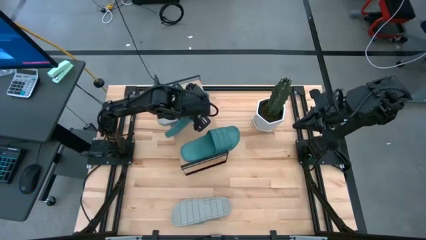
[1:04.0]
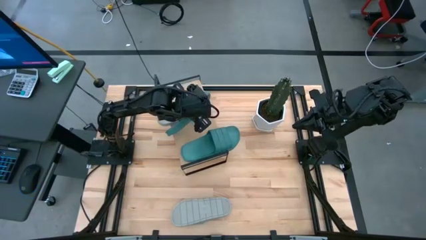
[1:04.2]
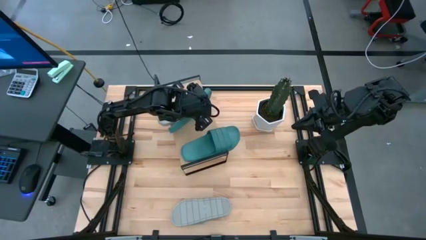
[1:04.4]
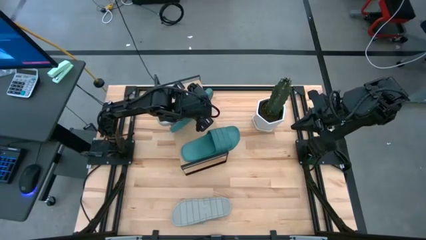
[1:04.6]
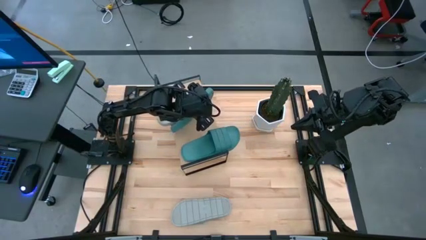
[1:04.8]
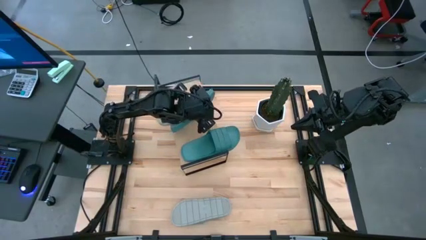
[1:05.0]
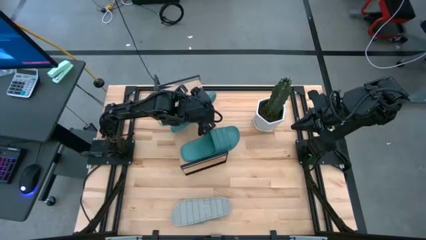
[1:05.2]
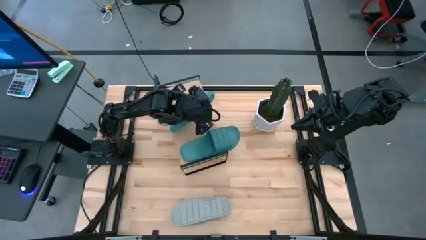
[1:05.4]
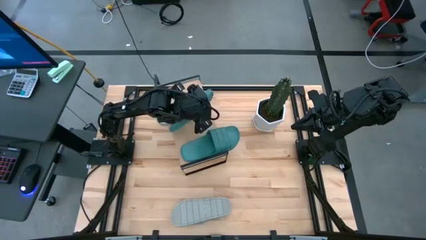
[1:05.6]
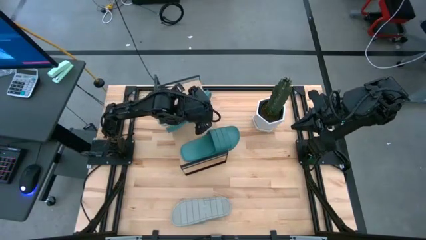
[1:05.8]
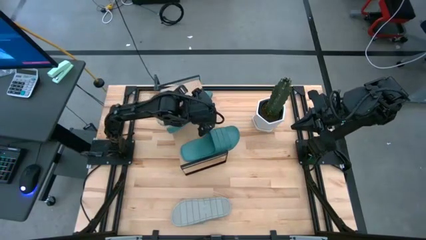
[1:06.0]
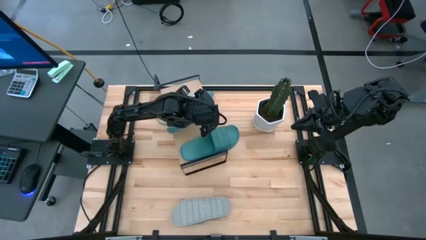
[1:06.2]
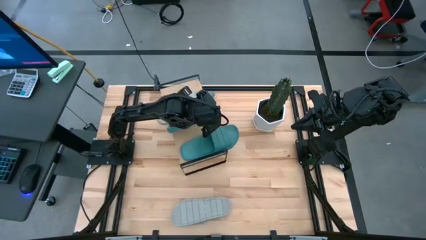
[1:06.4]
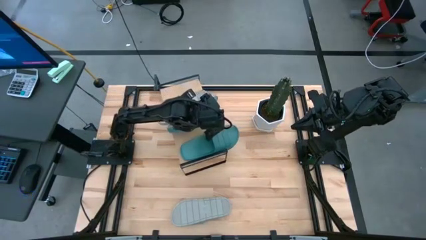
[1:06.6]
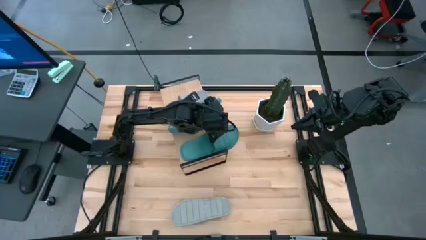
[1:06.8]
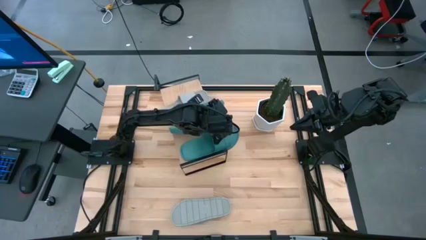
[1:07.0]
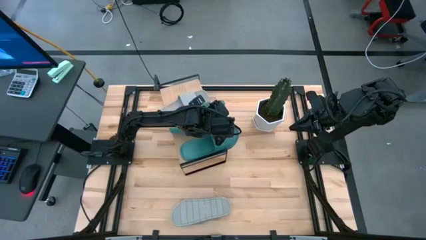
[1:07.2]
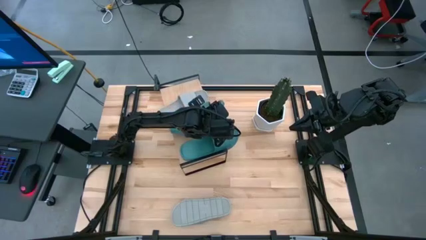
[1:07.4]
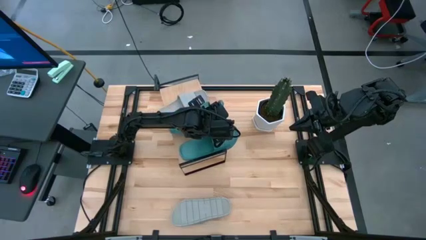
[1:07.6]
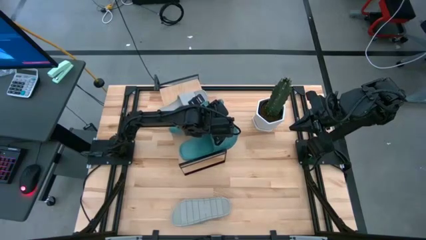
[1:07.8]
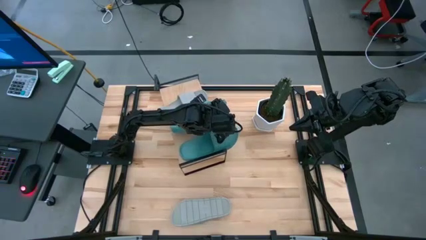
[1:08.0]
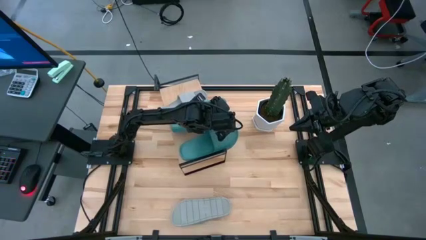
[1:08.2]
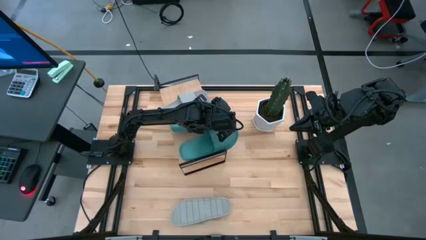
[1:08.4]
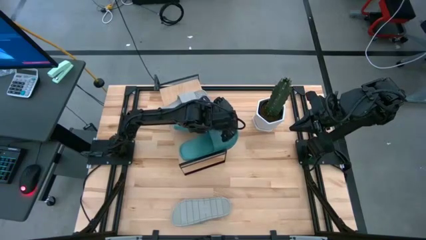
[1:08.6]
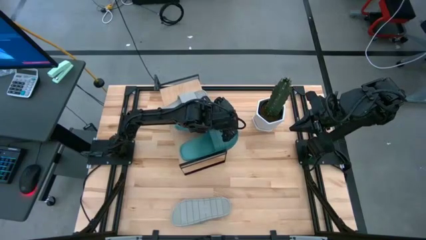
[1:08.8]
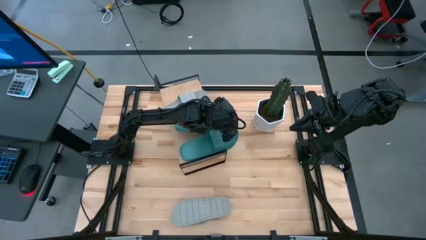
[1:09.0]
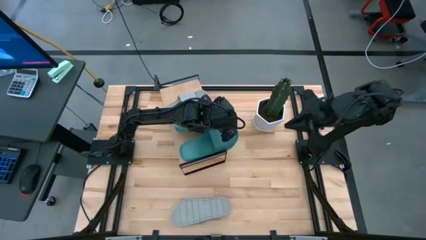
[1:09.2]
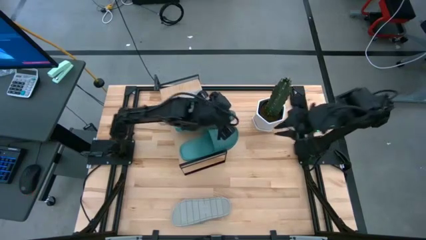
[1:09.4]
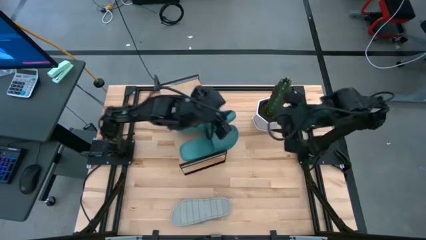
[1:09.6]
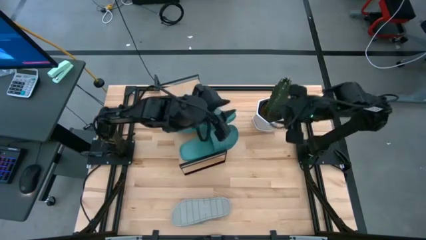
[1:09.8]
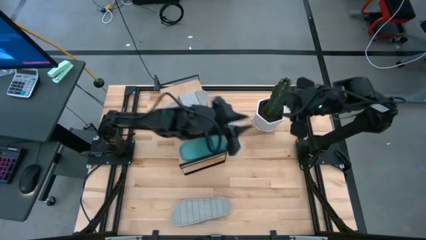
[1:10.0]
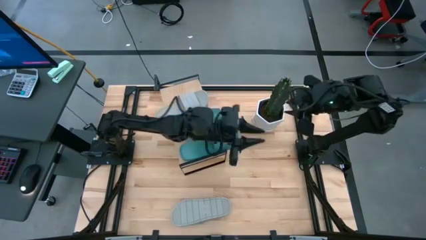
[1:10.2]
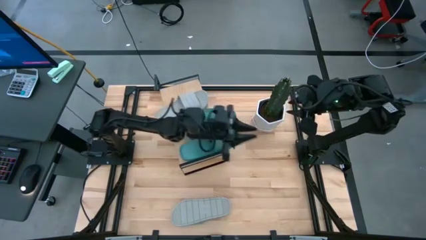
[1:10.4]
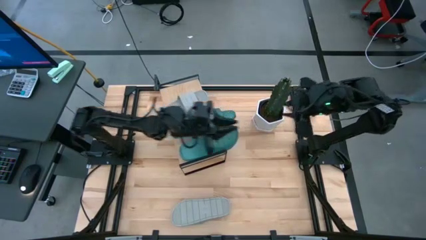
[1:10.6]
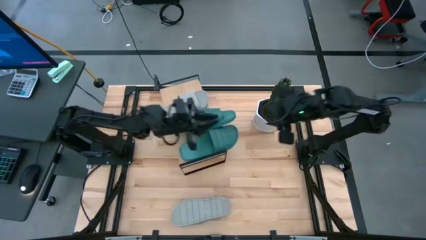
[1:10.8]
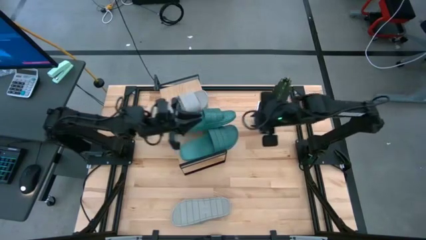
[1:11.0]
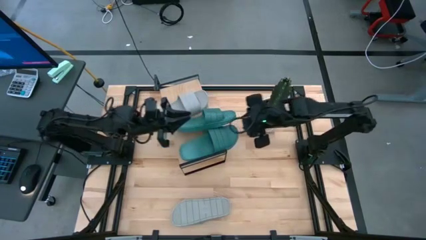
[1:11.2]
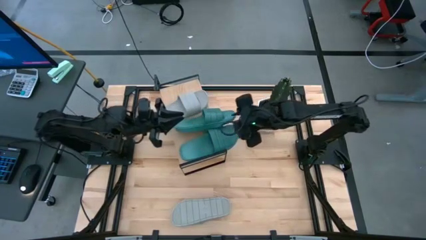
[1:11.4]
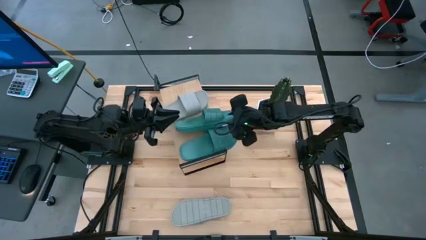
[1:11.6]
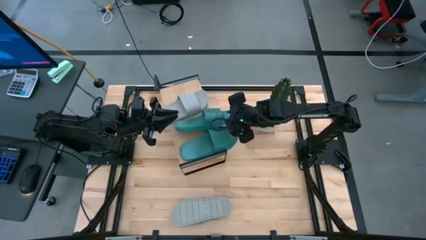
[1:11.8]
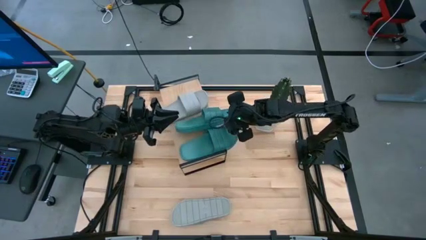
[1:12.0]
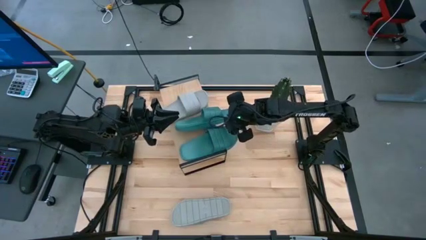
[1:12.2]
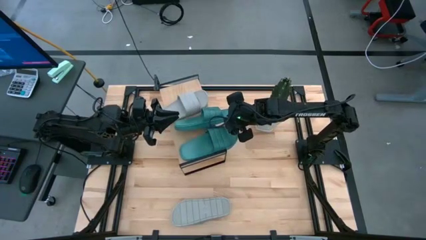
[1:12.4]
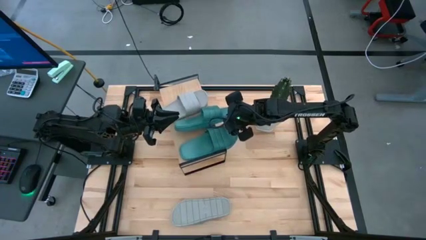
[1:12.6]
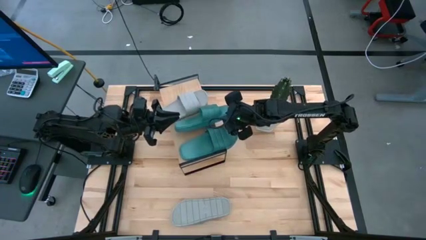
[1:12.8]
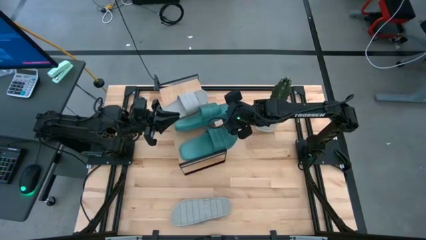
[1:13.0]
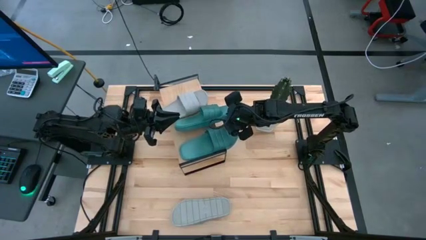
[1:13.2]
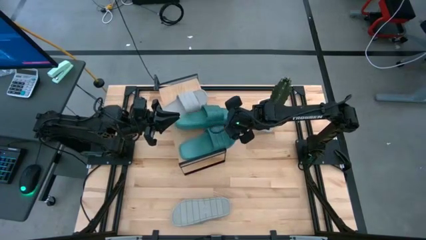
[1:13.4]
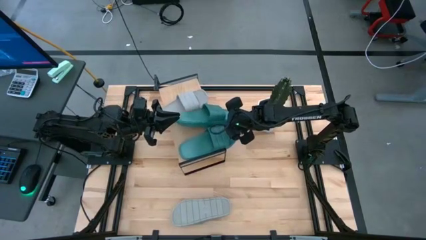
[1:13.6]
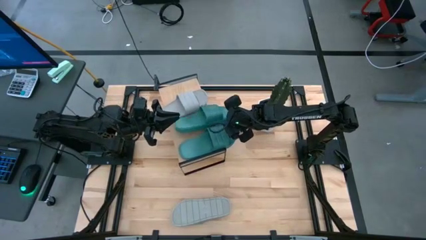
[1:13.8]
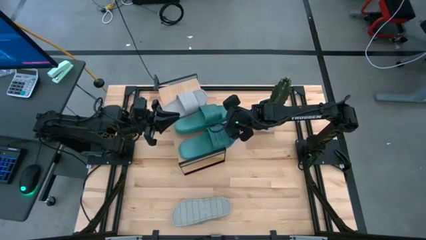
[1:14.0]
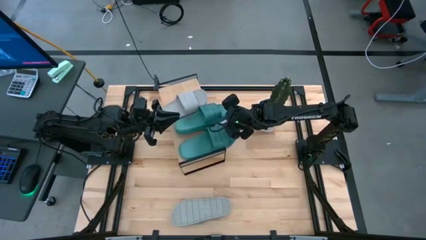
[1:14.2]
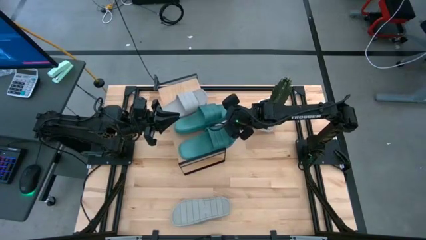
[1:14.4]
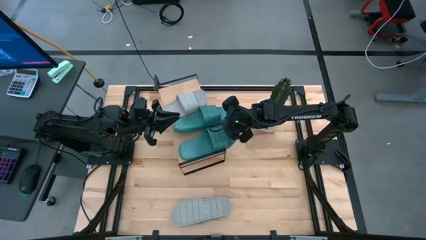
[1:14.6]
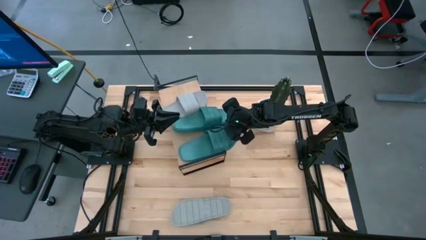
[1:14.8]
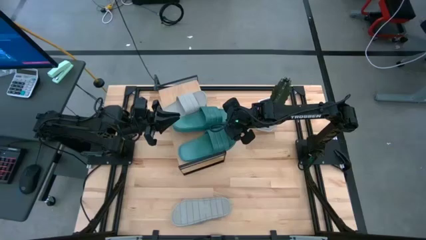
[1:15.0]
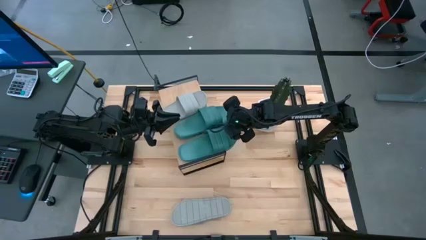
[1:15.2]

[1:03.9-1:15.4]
Task: Pick and place slides into the shelf
Put the green slipper on the shelf

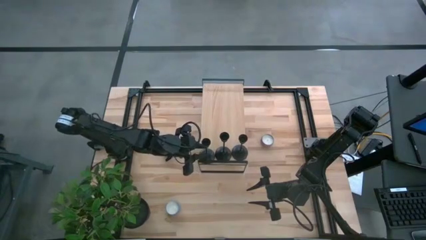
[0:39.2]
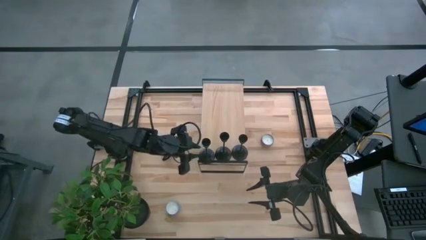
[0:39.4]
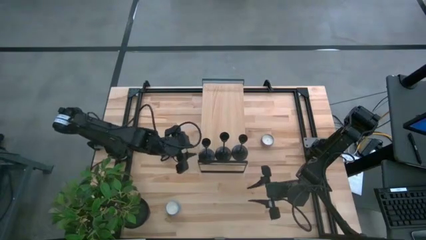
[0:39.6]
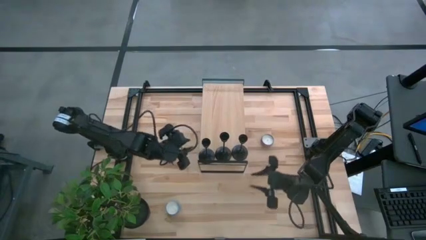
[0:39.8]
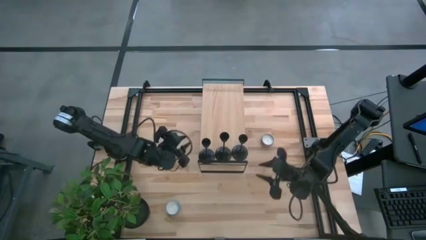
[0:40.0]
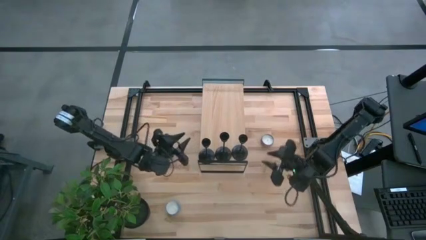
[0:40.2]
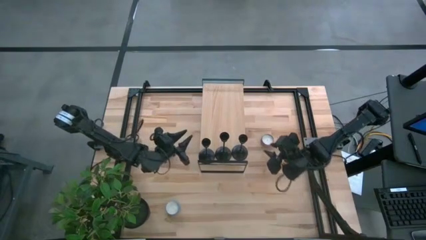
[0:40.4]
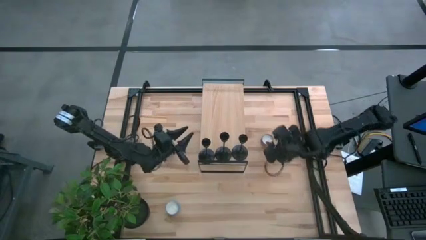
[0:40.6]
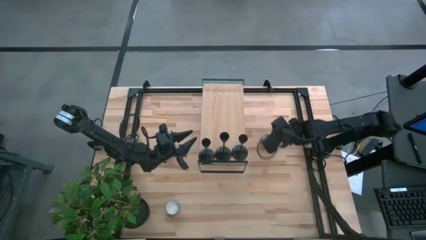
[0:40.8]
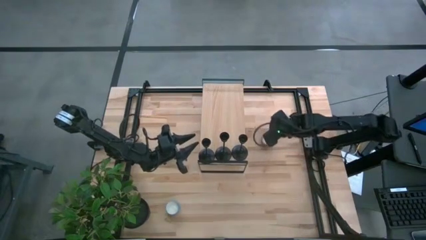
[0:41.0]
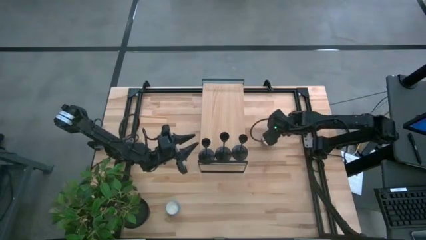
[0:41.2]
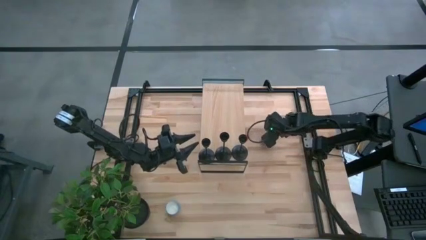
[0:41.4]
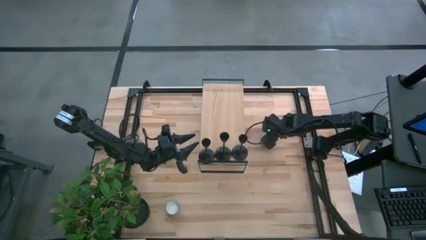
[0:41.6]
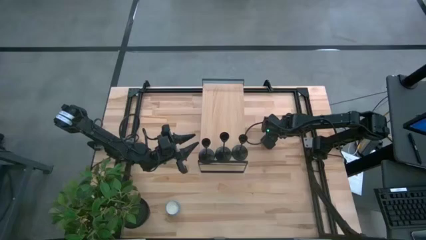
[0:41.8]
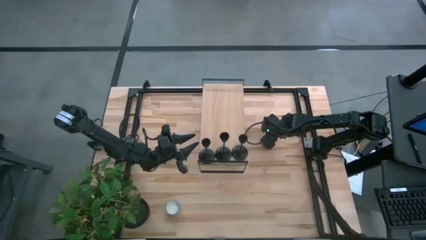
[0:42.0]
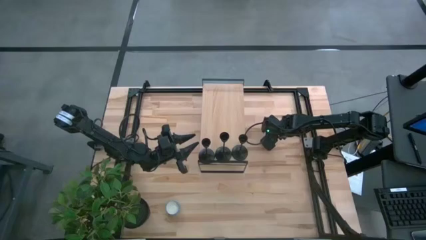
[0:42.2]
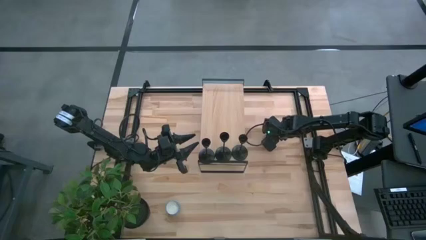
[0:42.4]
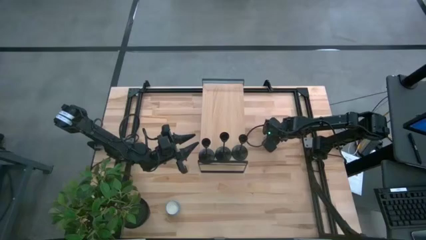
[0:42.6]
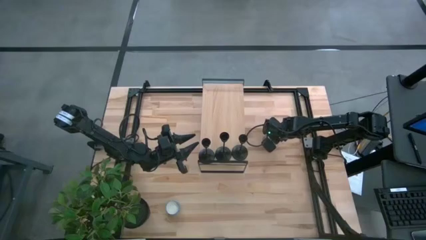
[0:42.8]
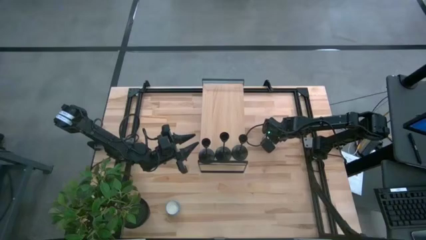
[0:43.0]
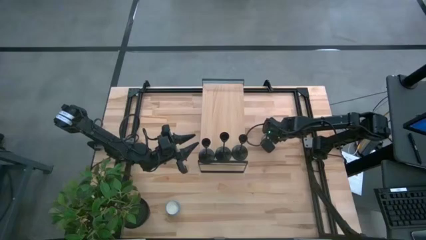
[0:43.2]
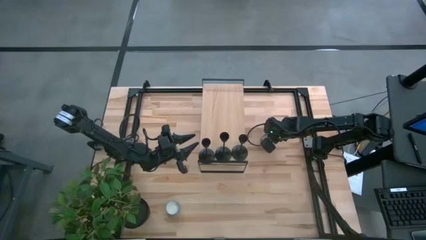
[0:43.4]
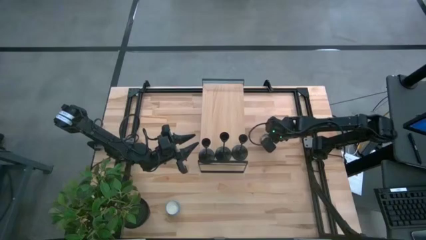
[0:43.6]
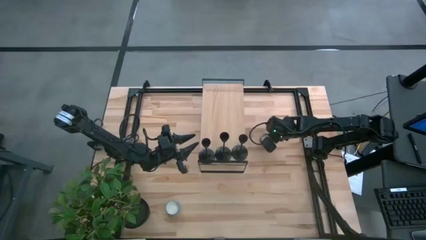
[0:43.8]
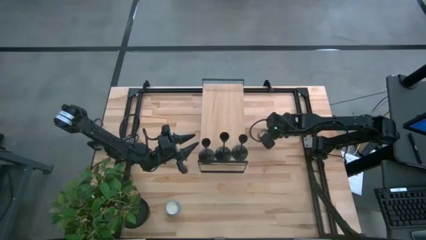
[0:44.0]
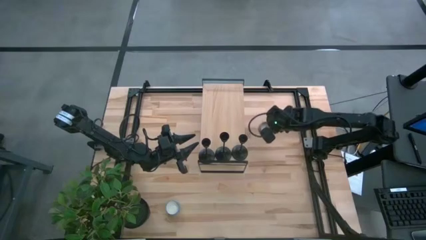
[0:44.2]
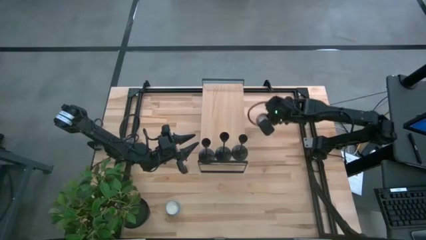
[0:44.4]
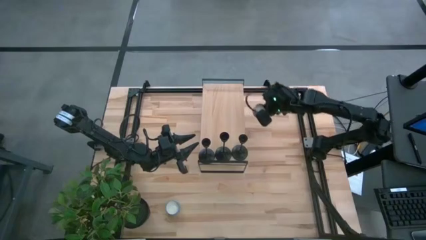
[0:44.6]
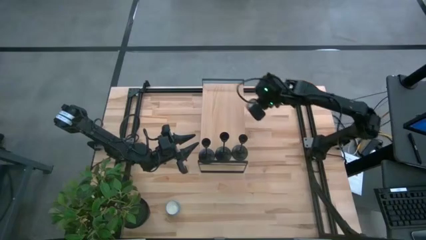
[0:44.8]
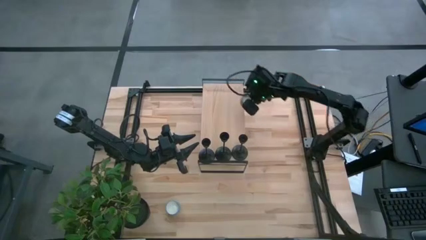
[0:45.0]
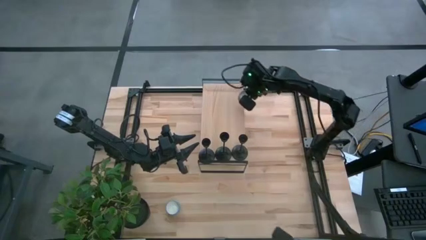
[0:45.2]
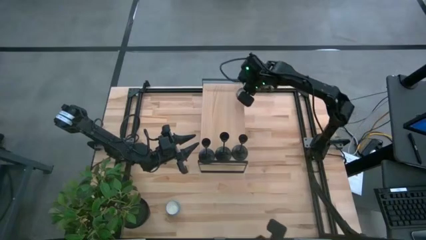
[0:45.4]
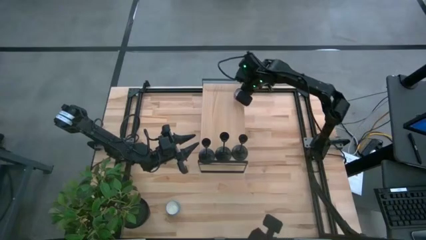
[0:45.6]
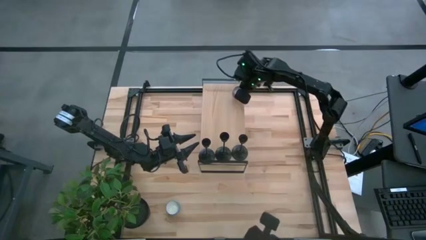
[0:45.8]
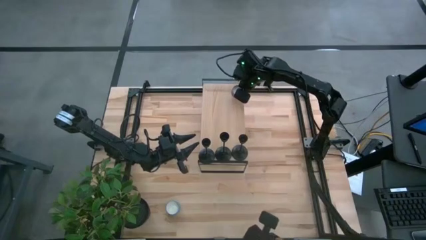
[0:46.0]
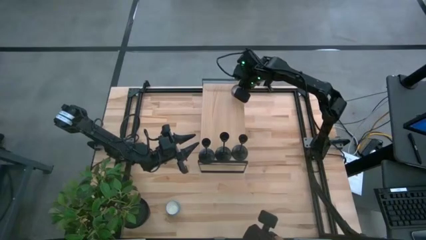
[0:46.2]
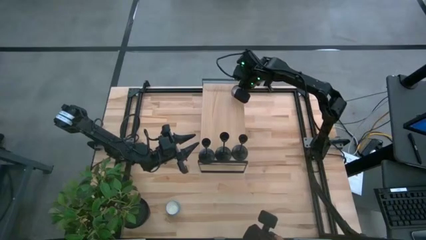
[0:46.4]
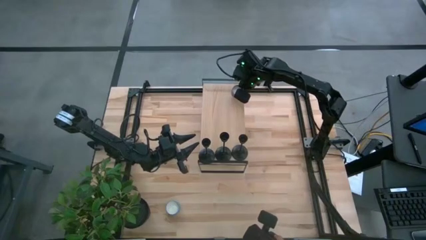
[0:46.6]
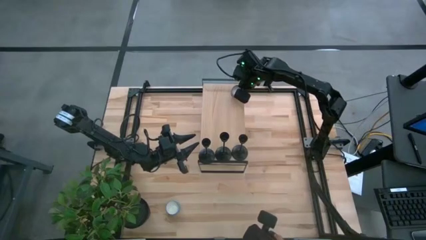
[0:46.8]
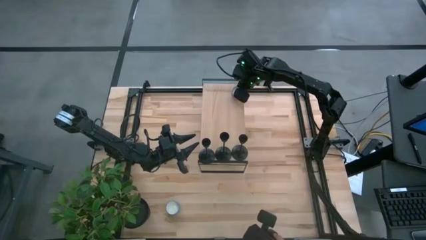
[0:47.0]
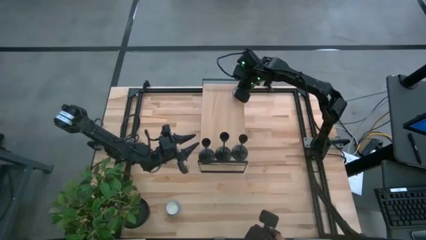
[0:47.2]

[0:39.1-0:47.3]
Task: Pick & Place candle stick holders
Put the purple scented candle on the shelf
